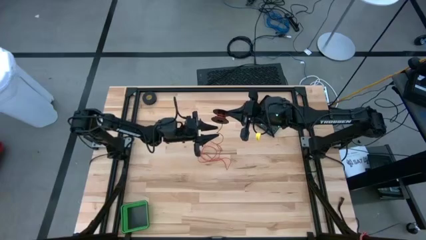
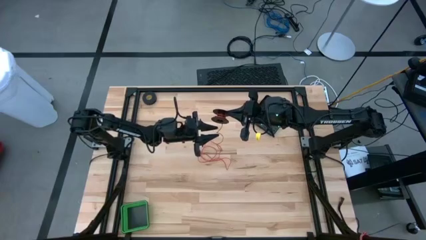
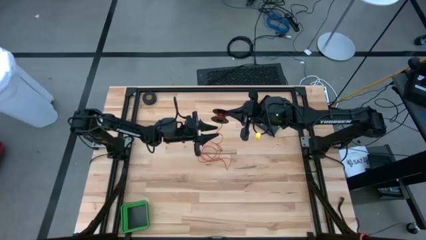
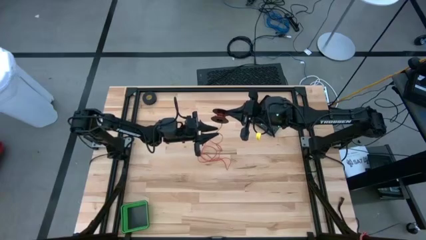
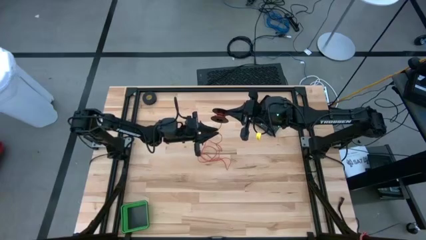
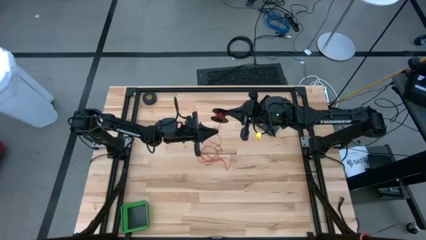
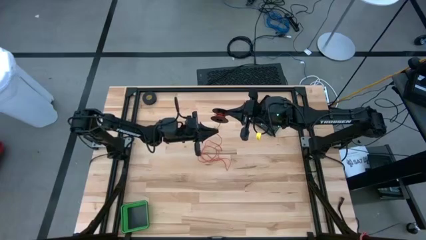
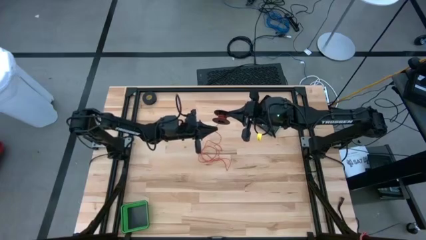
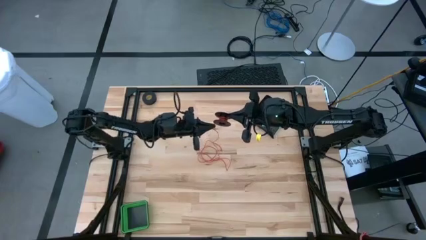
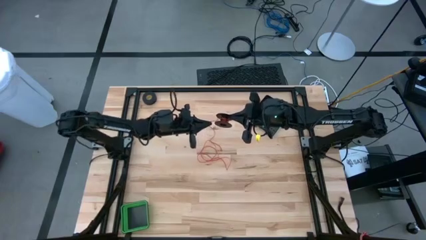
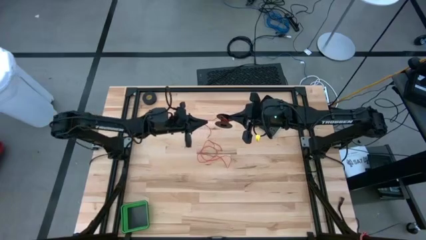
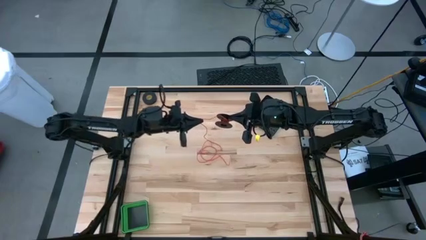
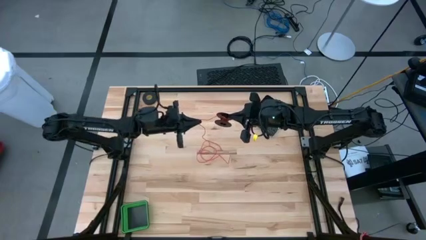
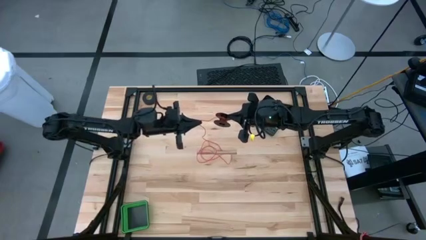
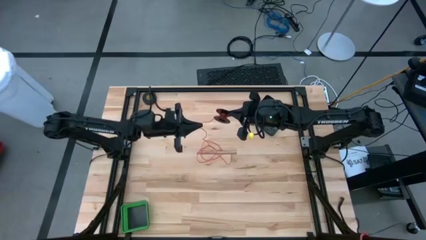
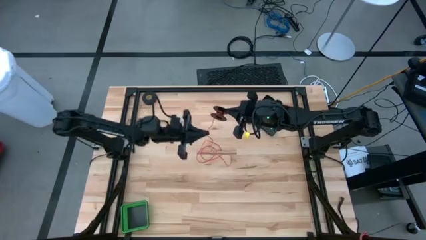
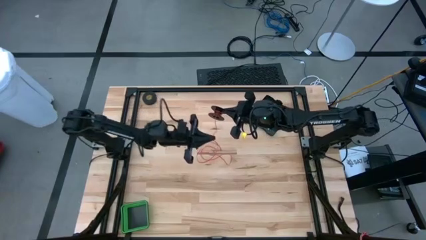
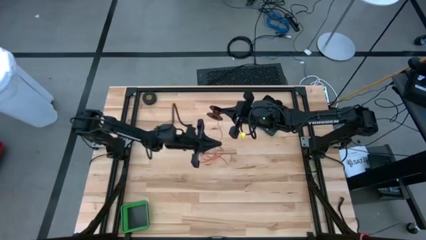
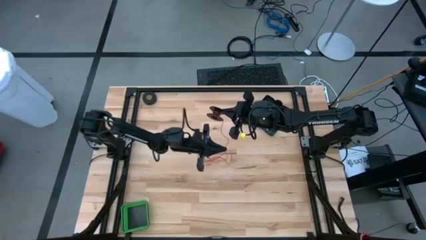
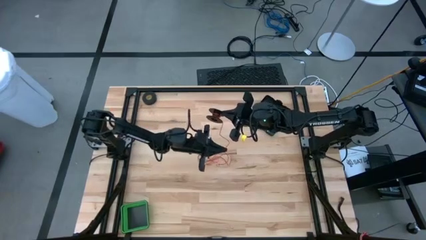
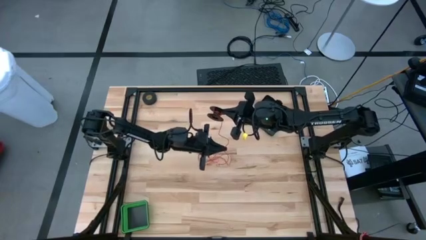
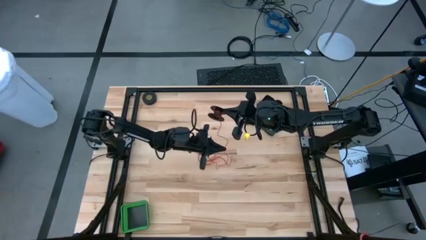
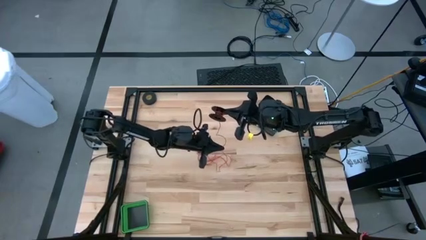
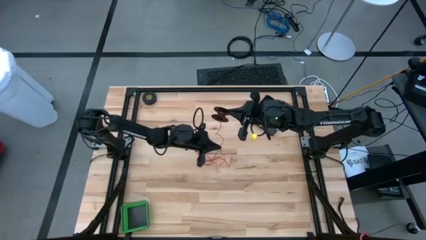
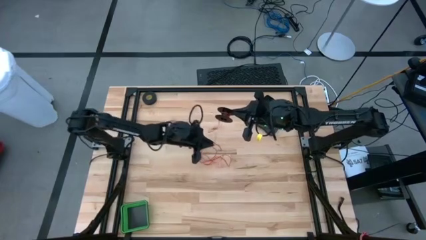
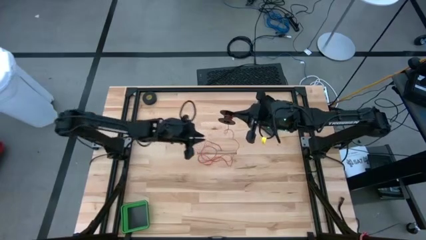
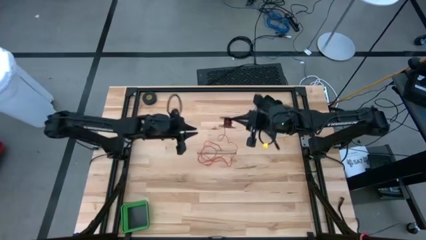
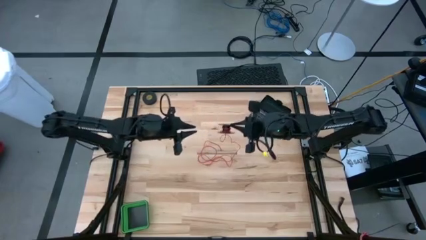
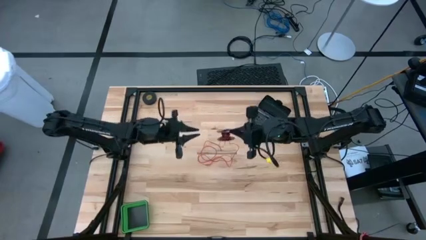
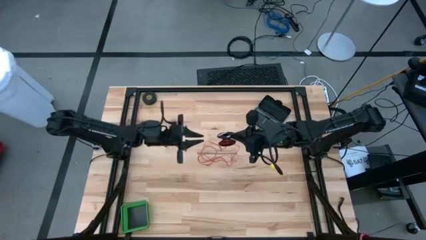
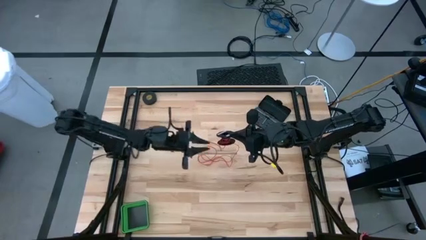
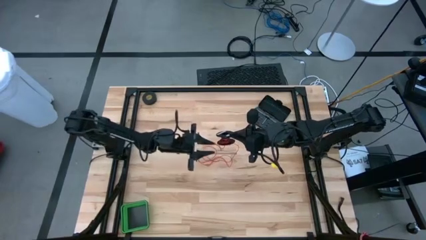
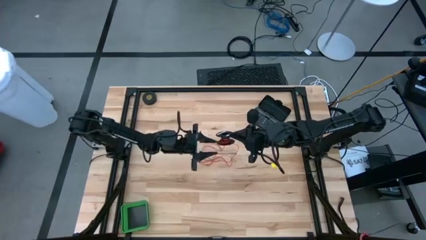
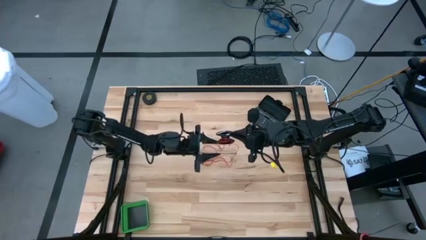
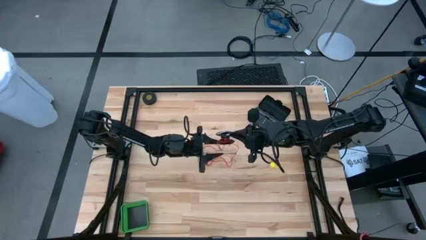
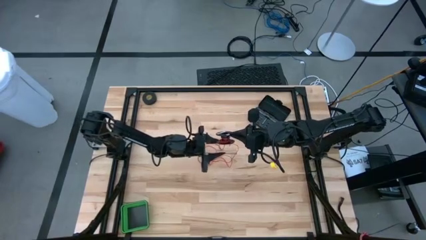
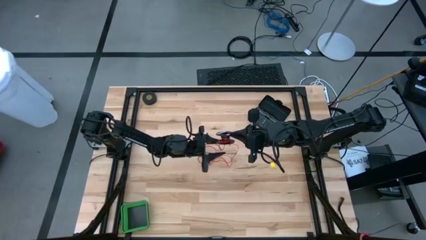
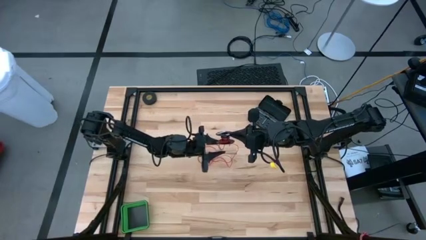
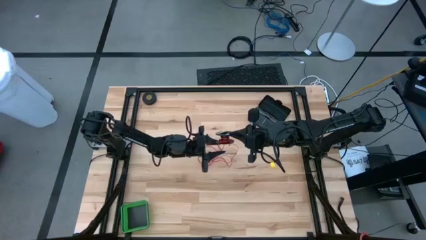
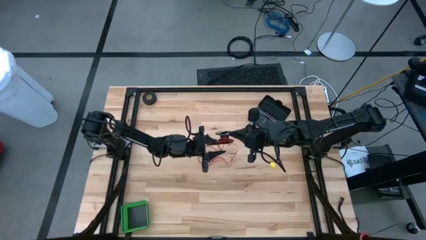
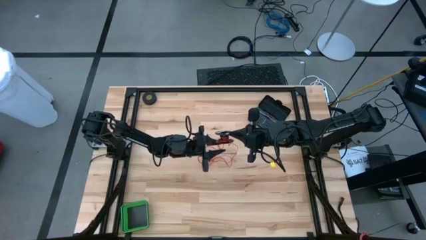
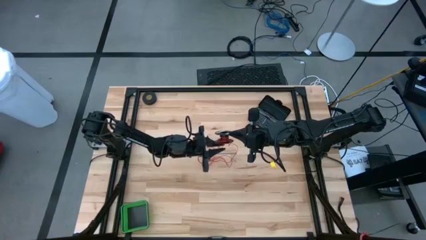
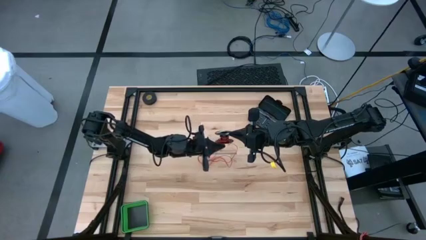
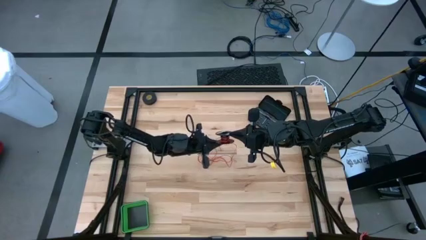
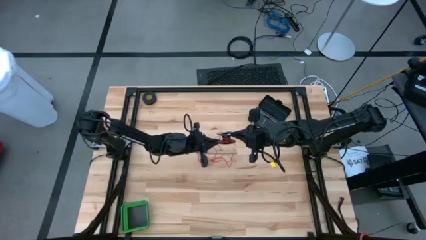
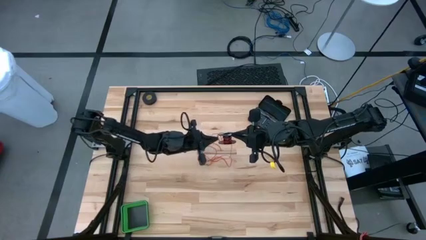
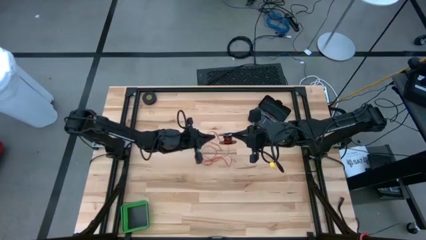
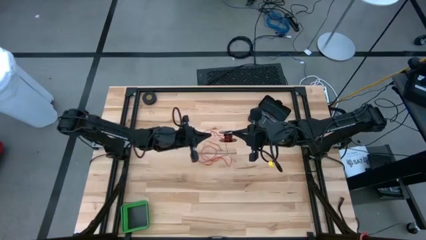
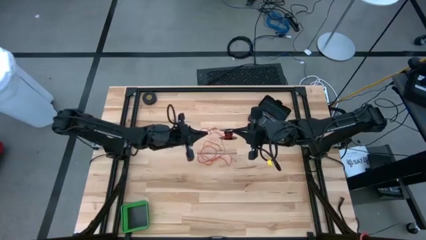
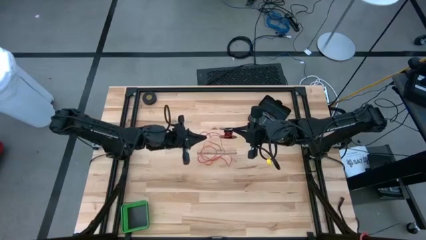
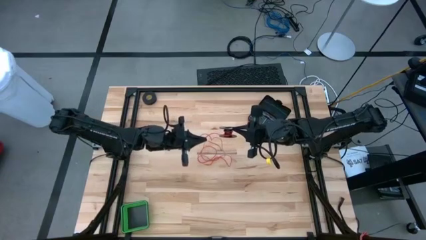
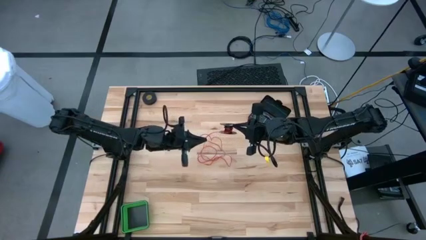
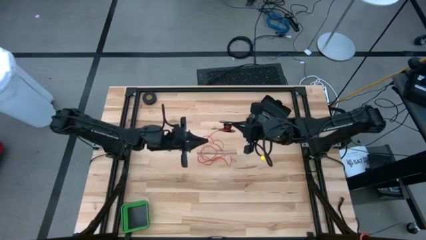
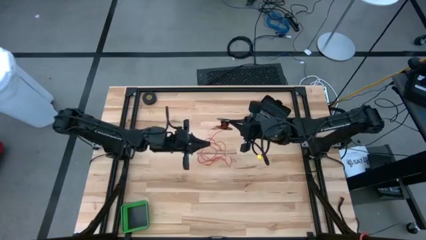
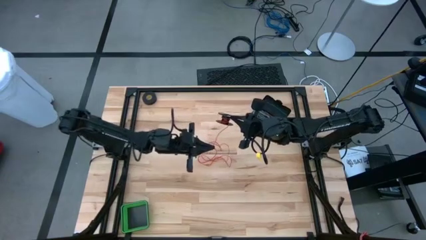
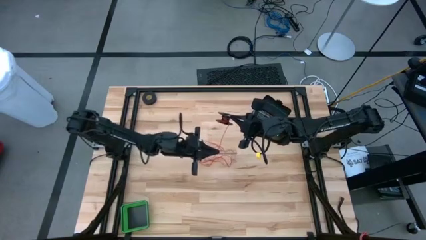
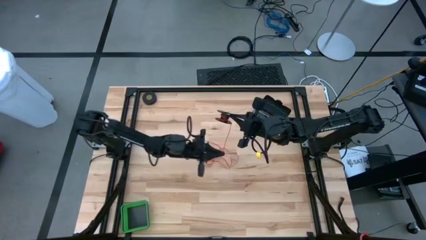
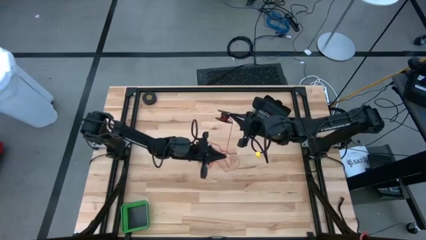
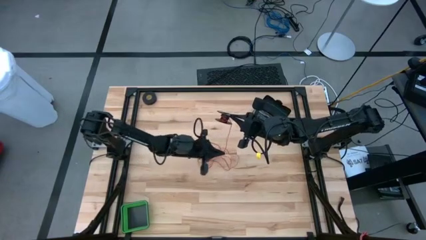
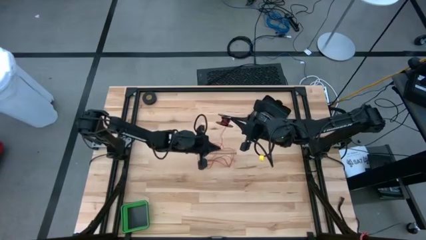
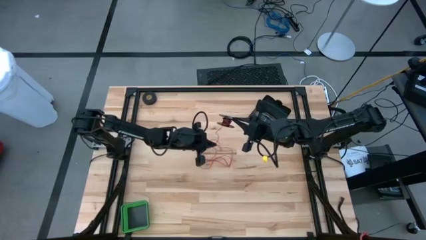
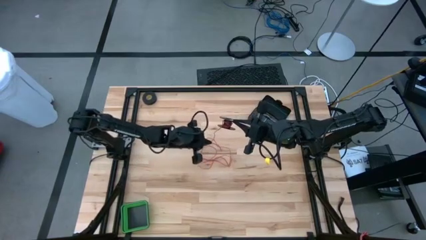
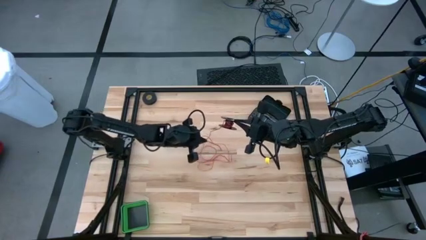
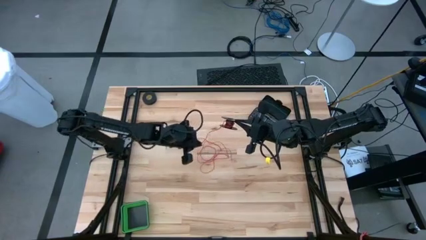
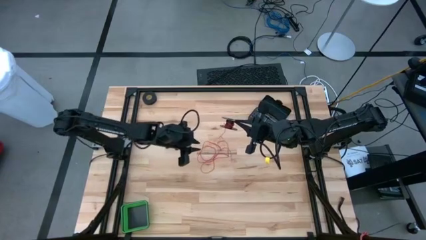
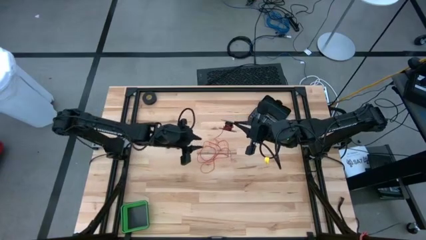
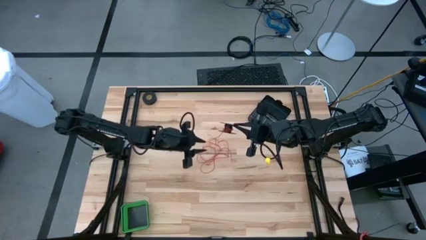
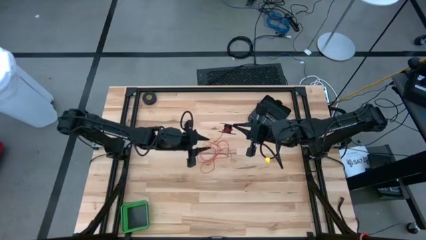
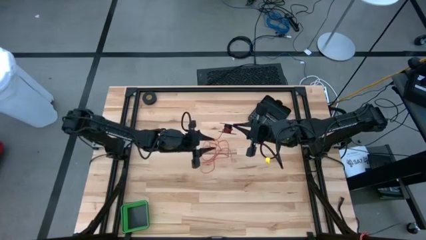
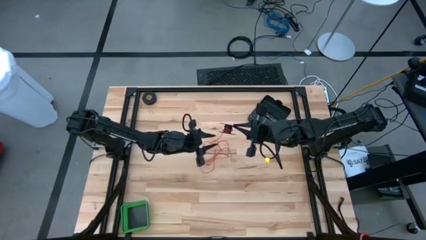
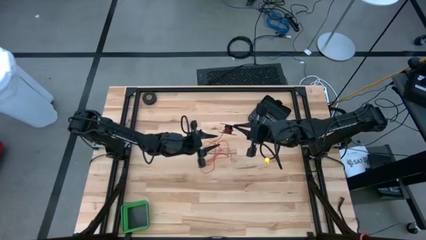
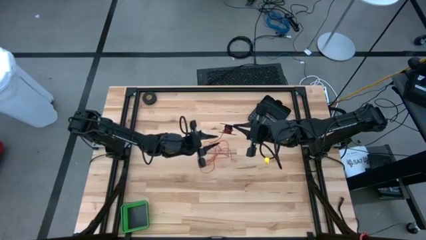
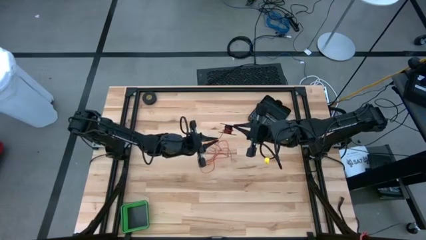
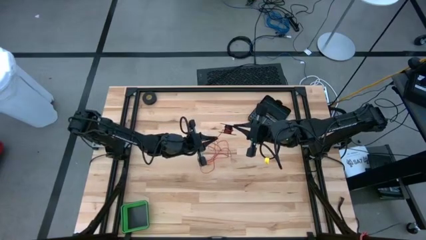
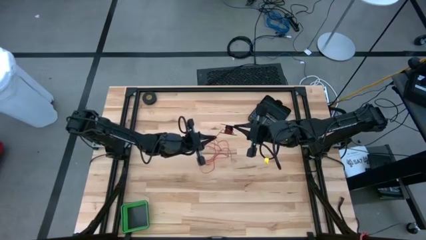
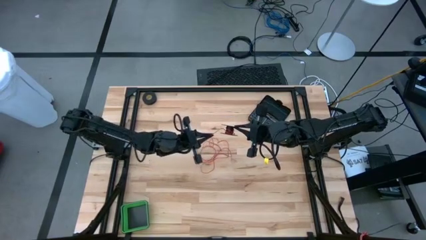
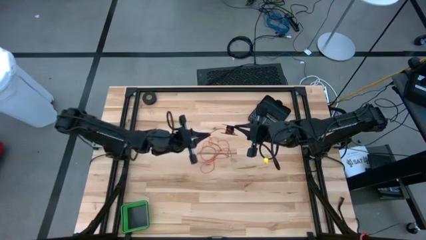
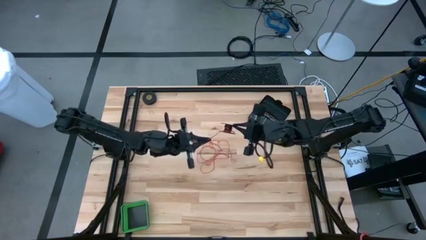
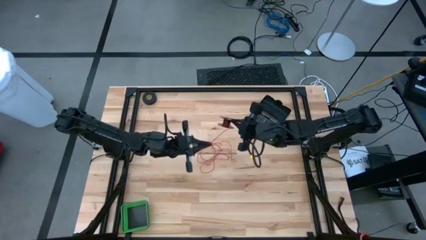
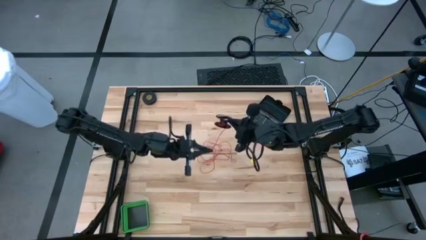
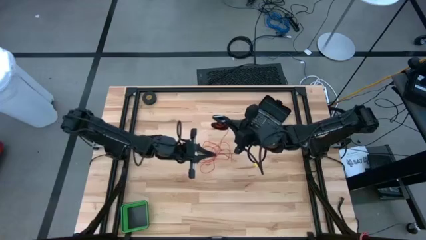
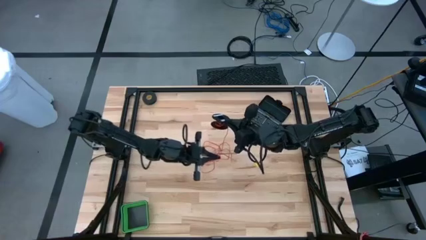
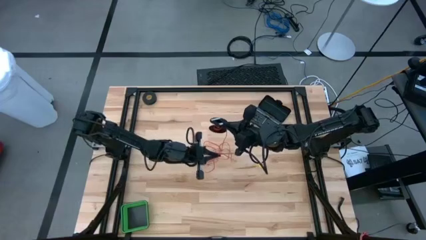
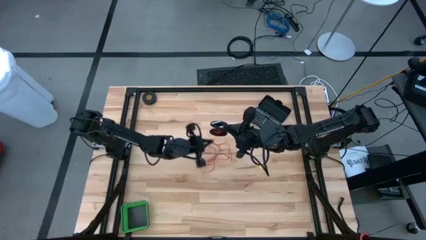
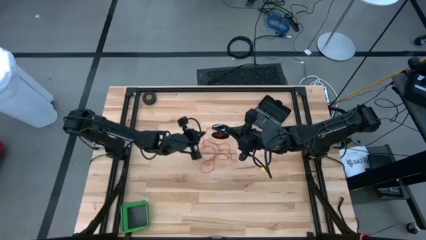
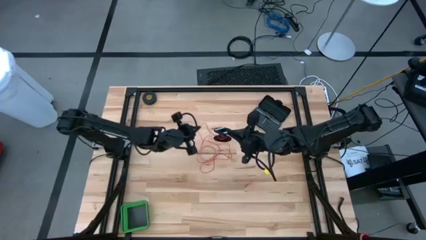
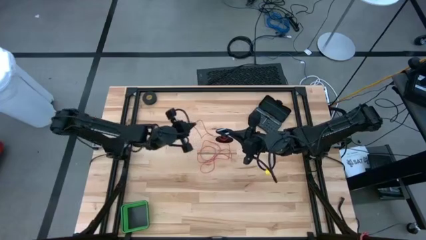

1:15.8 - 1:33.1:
Task: Coil cords
Uncoil the red wire from the spool
